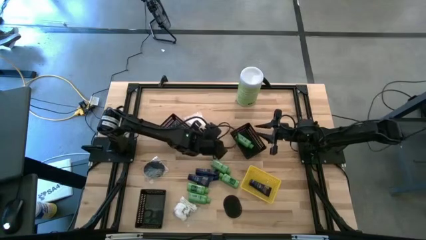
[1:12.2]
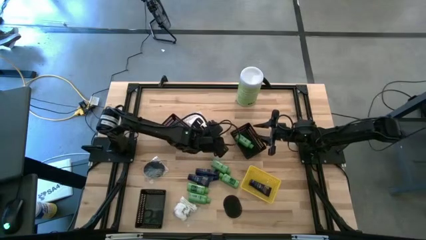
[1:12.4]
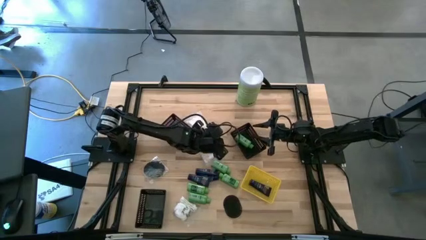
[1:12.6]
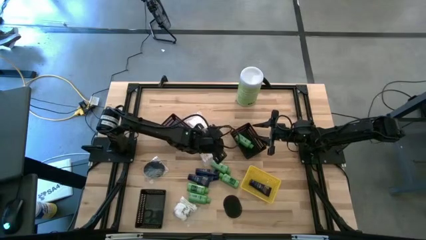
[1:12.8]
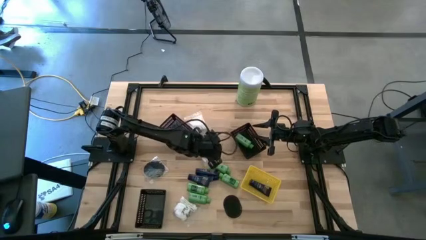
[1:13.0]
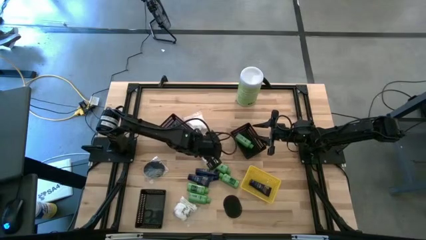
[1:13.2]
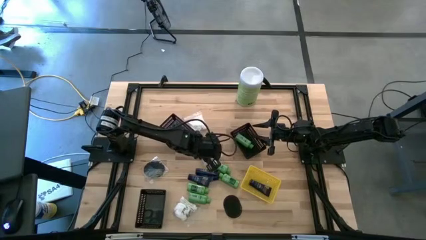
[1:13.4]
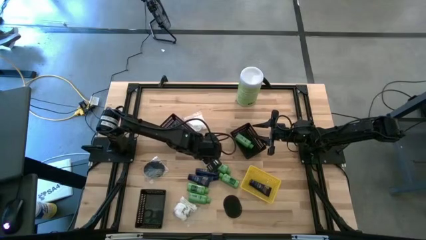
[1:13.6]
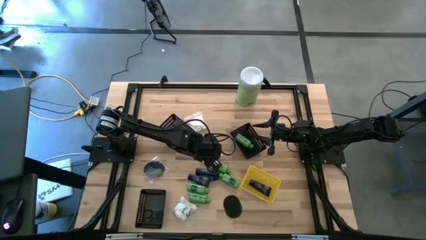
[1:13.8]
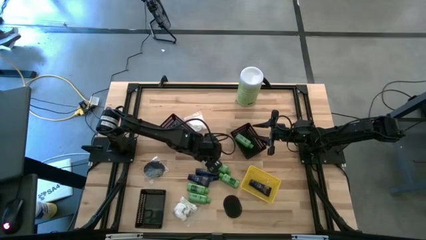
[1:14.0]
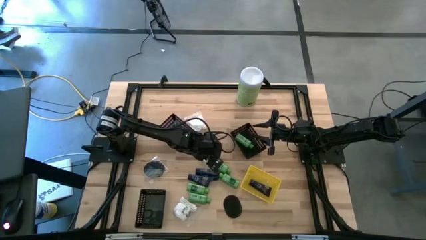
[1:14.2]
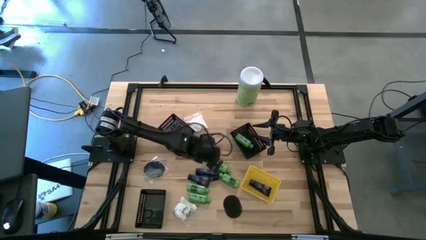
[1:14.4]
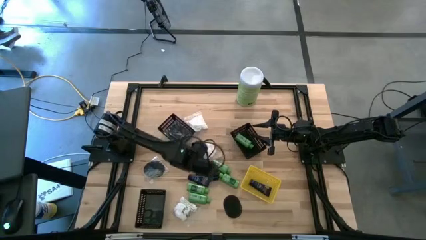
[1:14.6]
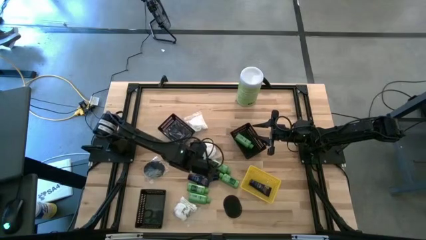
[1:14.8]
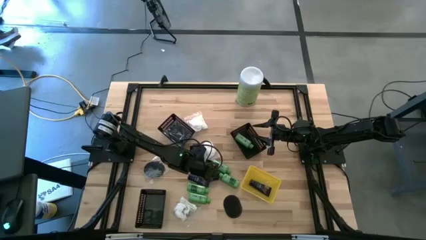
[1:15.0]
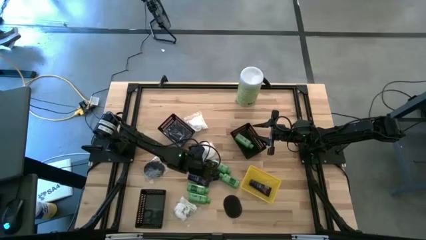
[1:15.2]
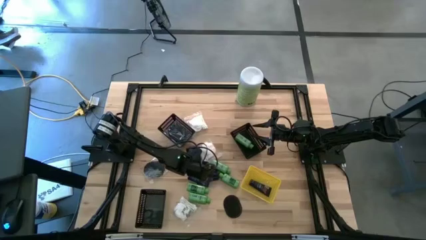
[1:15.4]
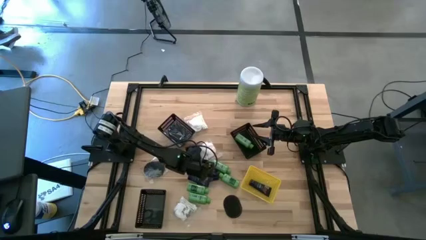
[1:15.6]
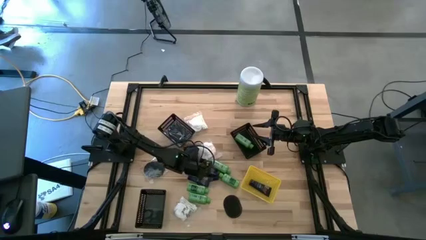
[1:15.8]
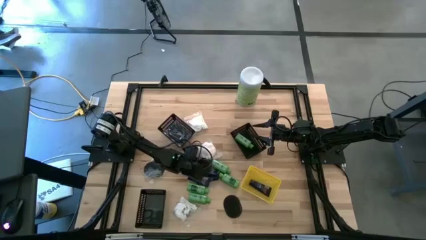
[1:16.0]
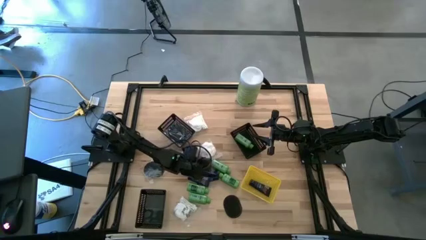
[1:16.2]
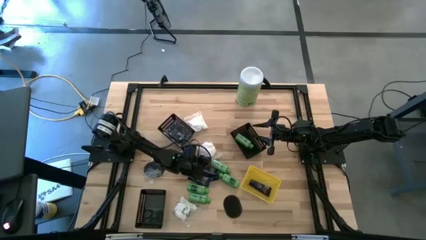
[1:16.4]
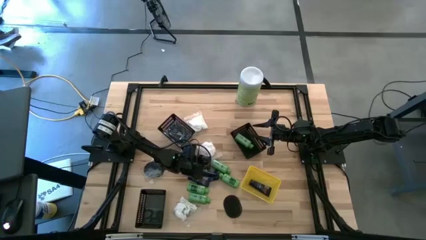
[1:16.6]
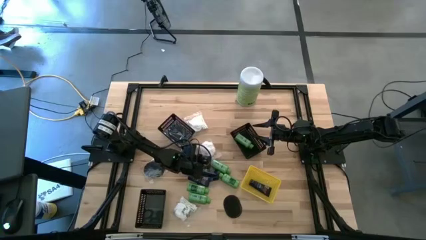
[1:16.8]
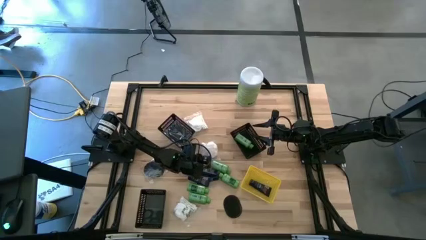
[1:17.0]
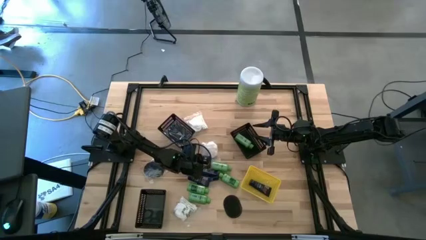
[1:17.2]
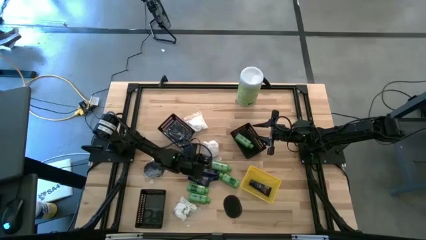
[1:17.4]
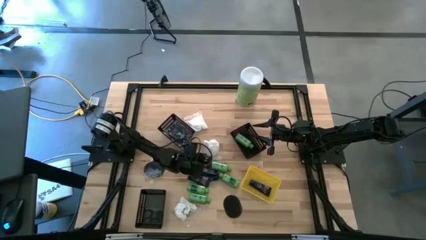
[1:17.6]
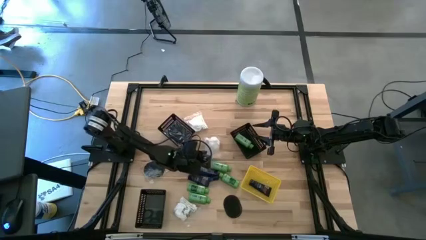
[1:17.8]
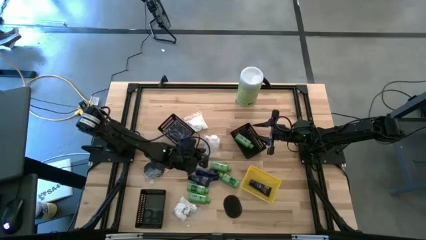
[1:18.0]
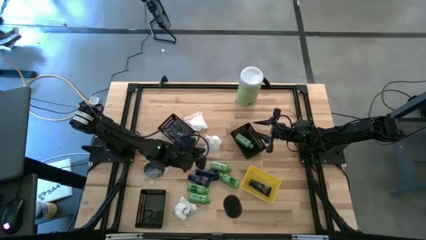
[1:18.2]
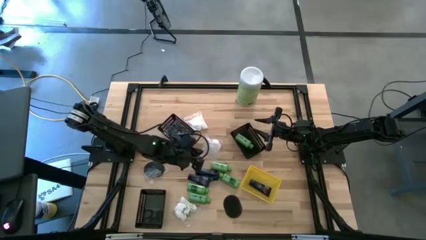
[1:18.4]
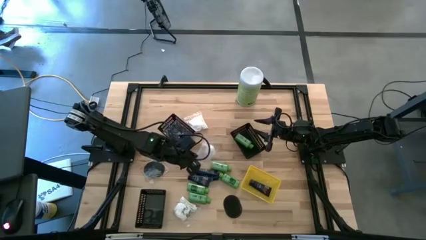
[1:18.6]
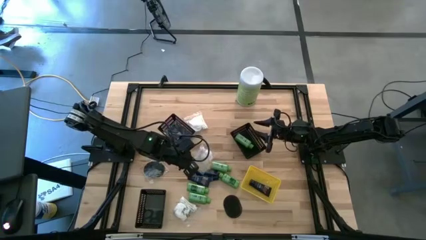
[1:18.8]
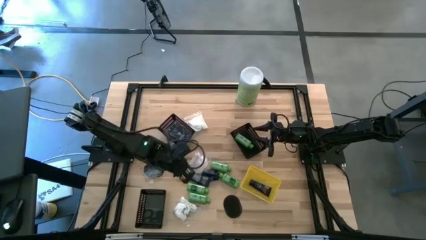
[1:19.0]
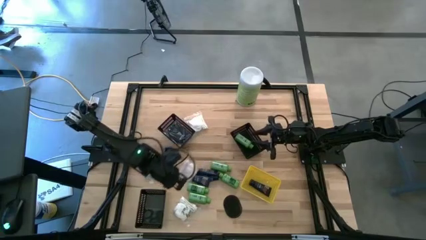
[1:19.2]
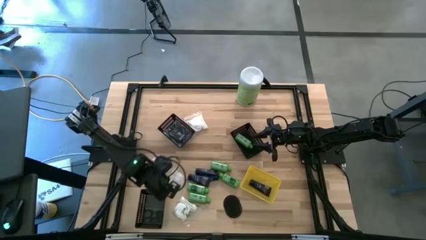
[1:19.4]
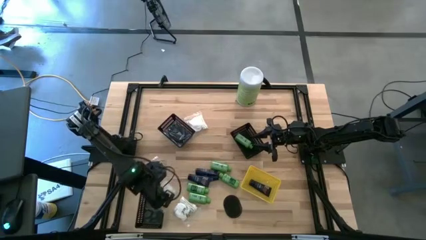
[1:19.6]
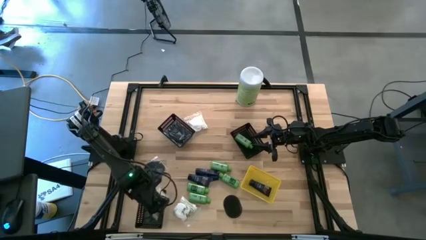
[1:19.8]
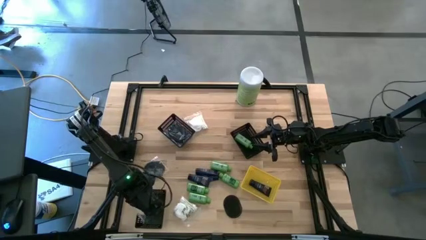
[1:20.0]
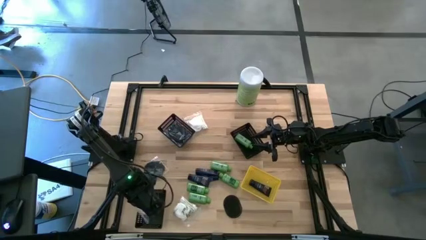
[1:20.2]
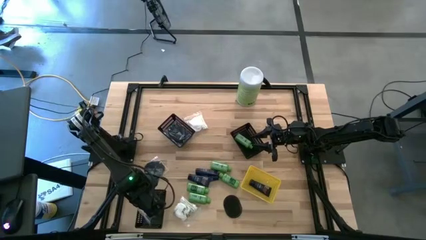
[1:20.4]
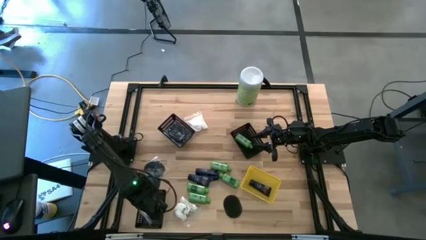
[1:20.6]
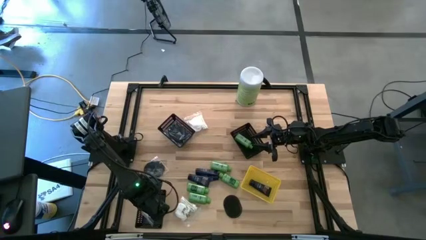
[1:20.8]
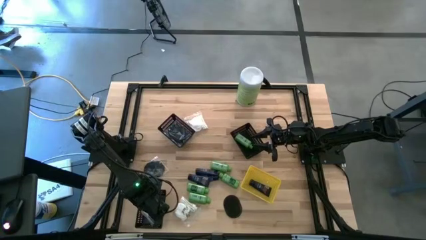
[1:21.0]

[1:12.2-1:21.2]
Task: Pick & Place Travel size toiletries
Put the cotton pack into the bottom left black bin

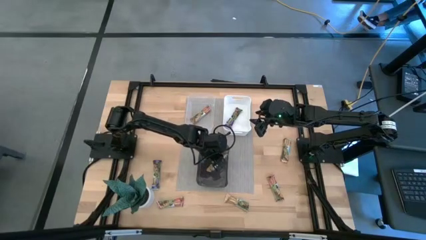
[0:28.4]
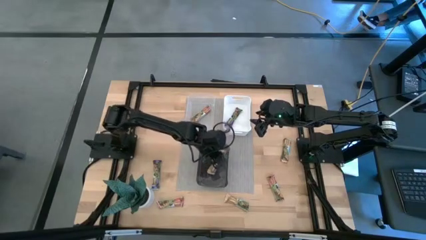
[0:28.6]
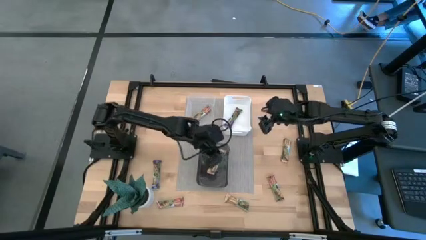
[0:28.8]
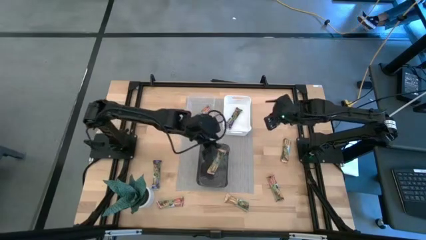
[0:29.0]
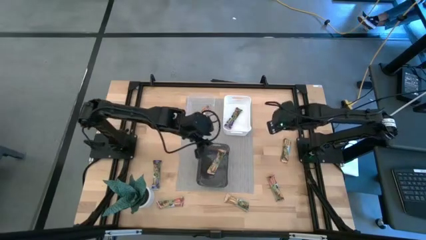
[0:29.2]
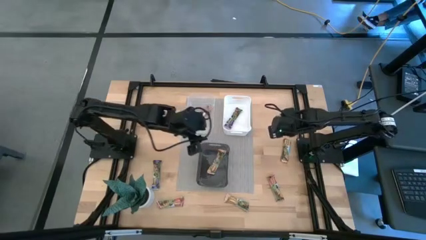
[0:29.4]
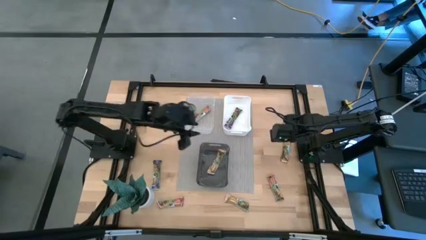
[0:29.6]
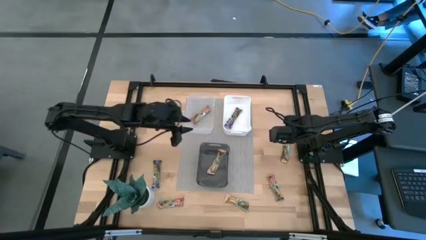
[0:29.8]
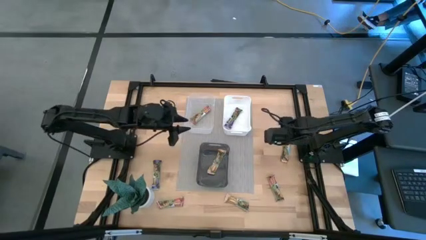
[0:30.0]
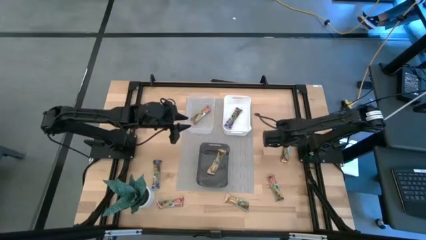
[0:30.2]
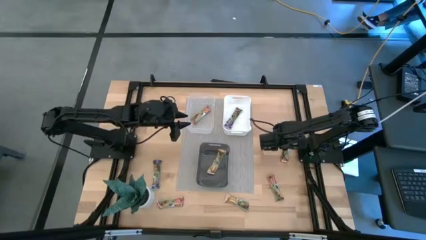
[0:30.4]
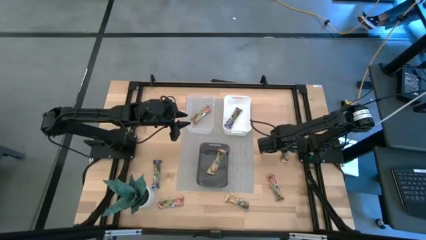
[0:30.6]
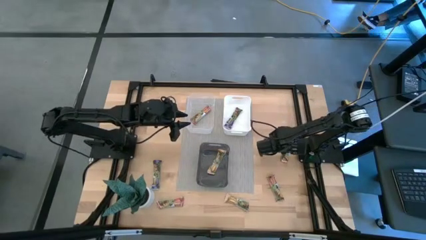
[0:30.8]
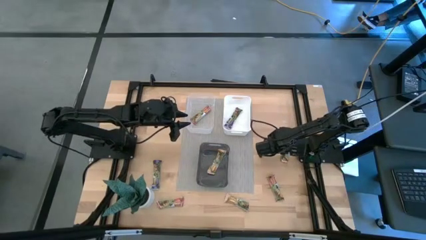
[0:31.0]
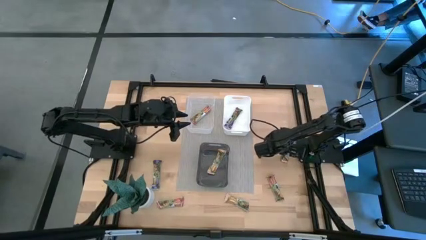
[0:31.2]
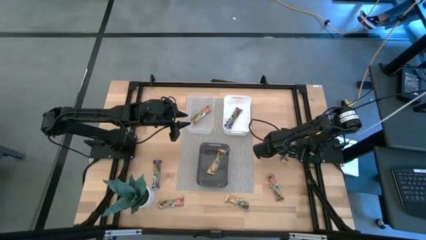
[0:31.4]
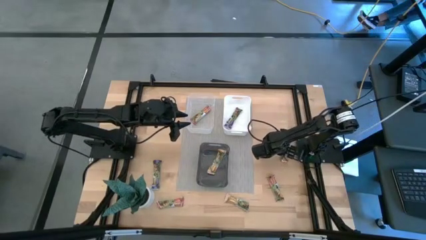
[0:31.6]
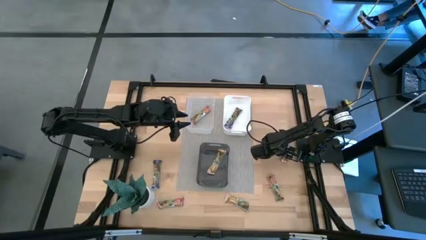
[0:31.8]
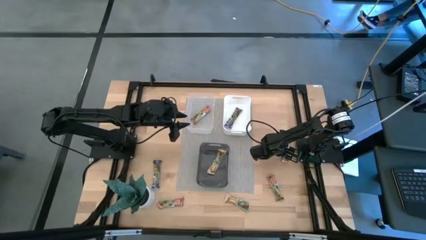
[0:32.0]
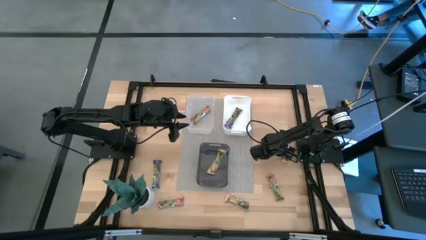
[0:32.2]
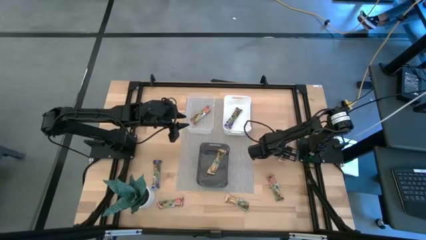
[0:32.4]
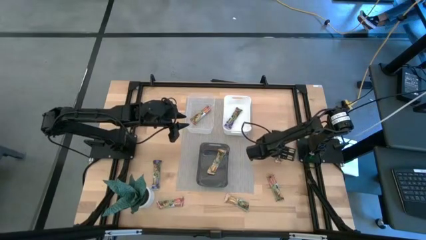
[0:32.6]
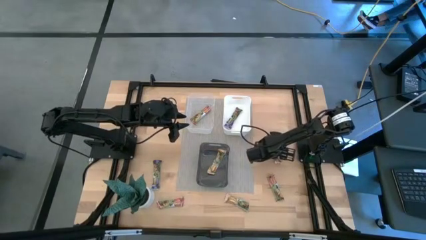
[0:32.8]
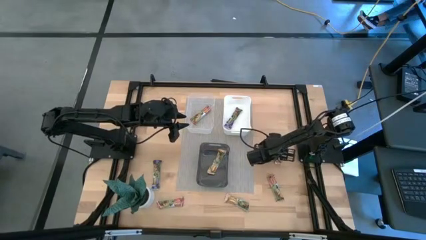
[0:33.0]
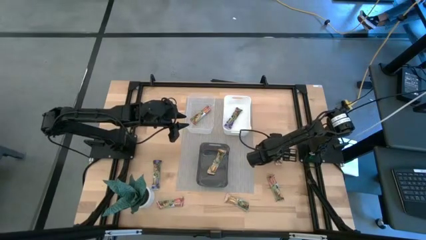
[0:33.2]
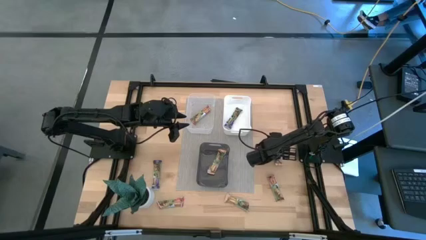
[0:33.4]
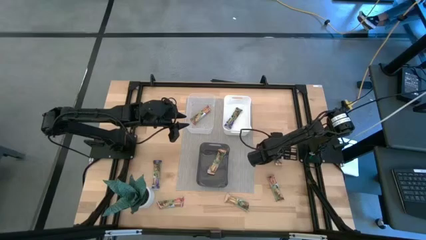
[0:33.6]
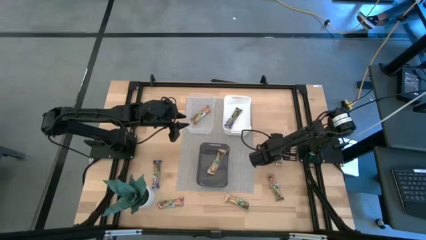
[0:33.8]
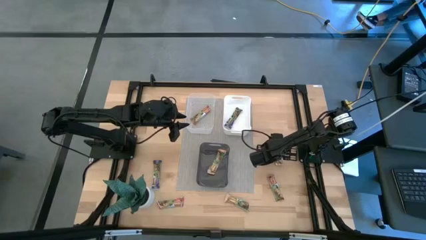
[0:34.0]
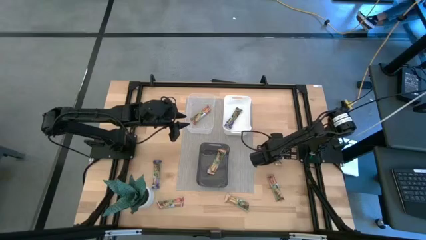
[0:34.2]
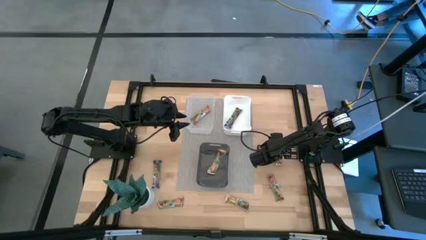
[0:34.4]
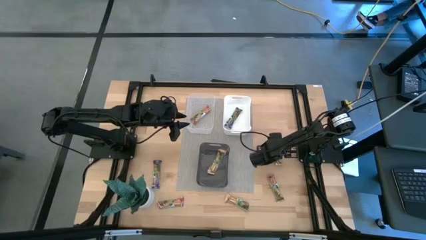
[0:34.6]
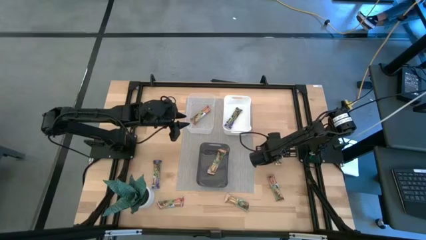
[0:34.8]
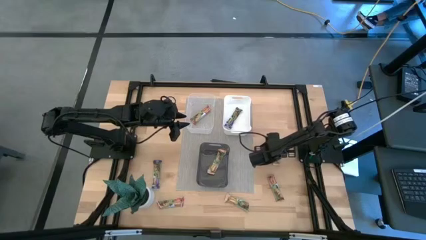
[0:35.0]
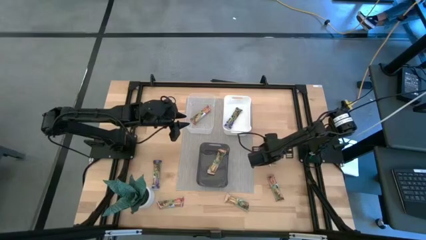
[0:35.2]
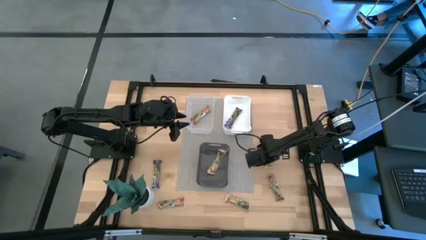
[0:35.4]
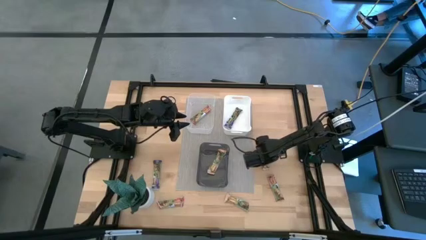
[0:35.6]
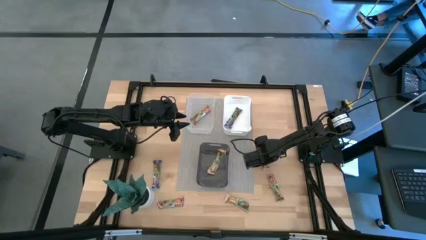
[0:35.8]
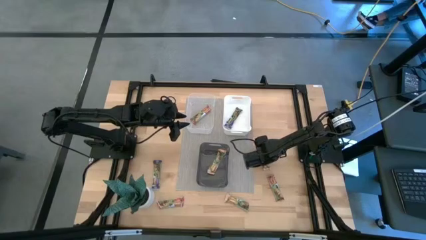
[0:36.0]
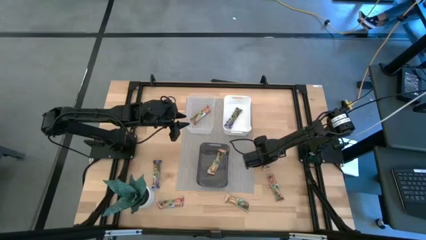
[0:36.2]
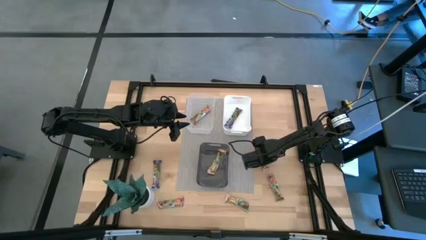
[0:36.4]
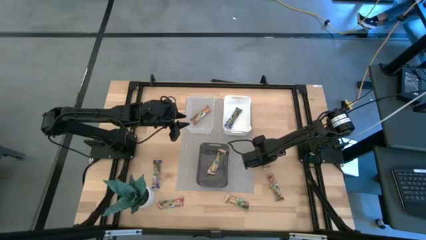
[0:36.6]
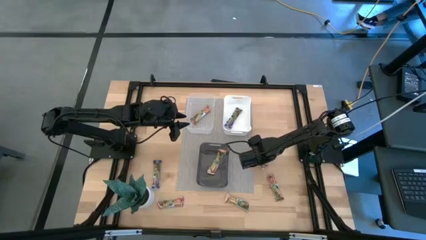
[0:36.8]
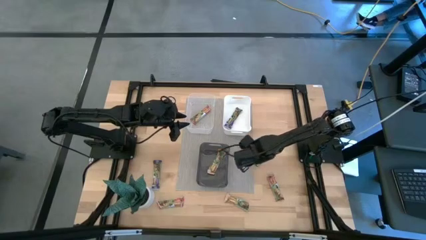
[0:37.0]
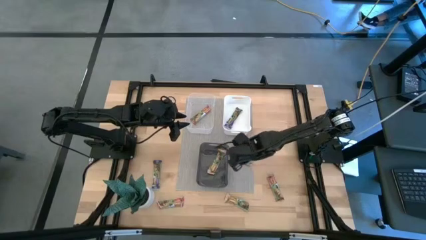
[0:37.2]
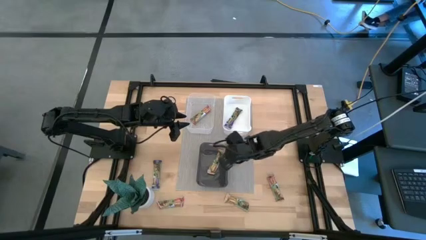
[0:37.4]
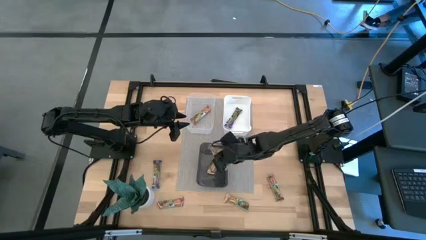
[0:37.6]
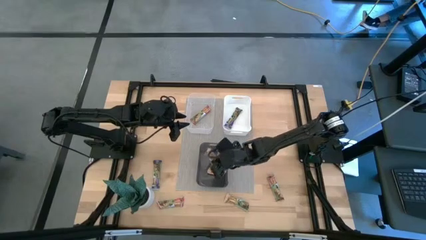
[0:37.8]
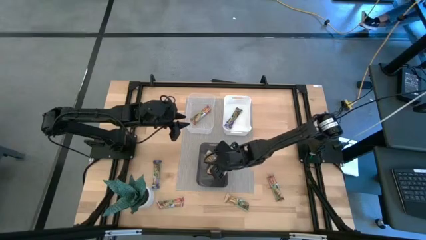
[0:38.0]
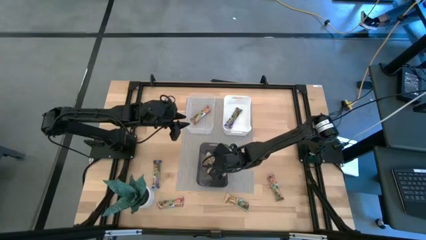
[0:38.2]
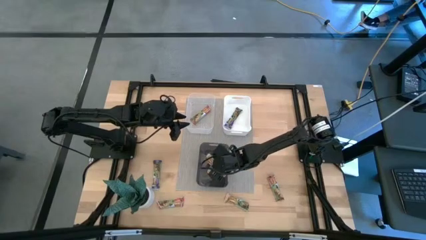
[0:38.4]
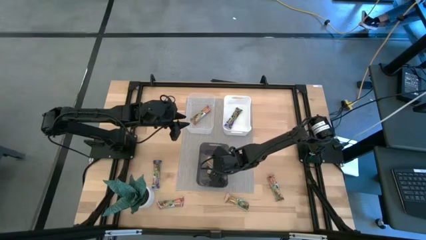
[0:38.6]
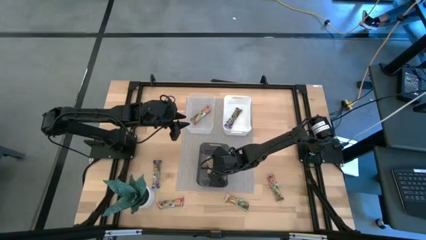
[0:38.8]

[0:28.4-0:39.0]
Task: Pick and place Granola Bars by type
Put the top yellow granola bar into the black bin
